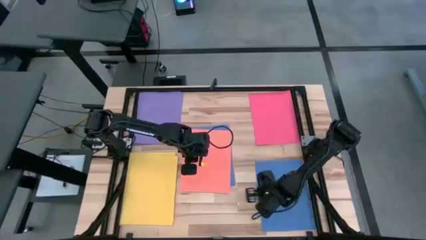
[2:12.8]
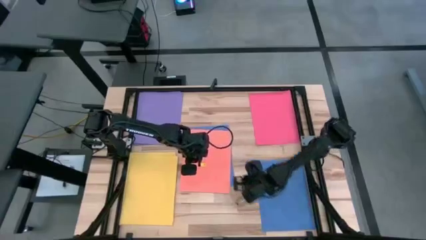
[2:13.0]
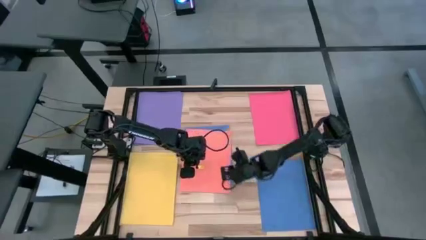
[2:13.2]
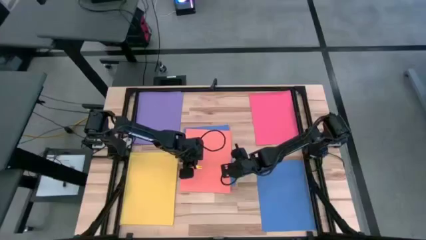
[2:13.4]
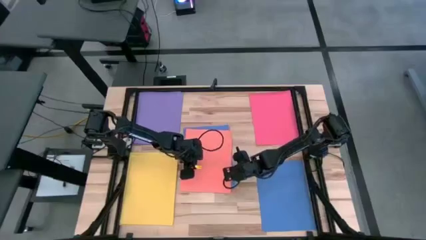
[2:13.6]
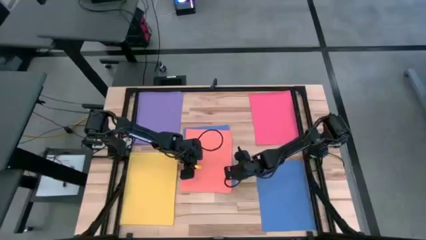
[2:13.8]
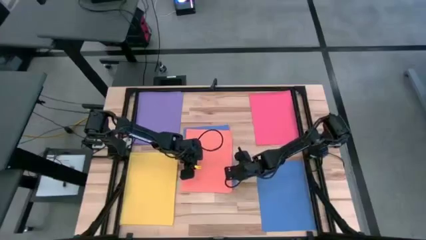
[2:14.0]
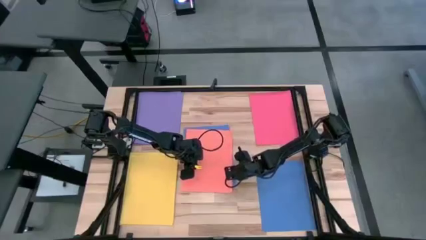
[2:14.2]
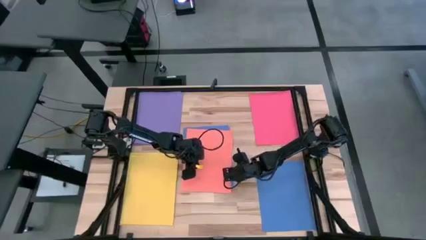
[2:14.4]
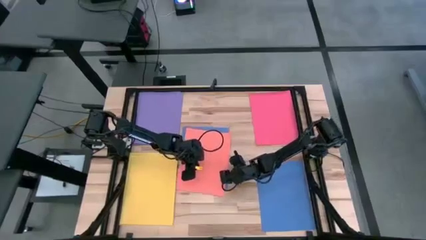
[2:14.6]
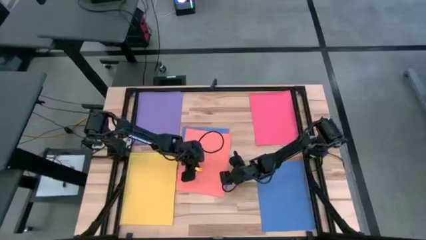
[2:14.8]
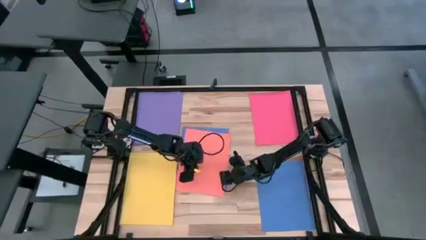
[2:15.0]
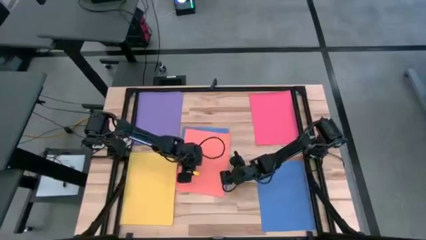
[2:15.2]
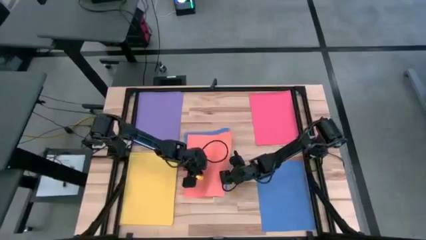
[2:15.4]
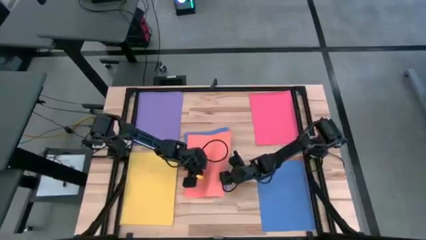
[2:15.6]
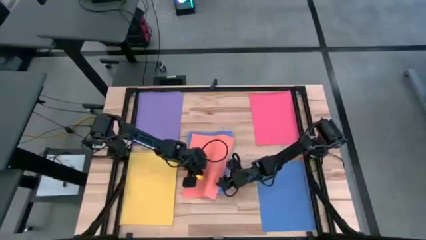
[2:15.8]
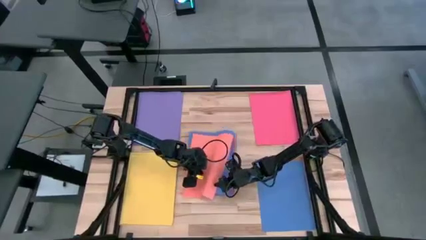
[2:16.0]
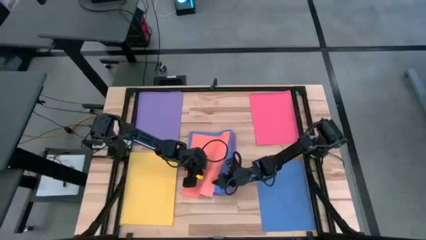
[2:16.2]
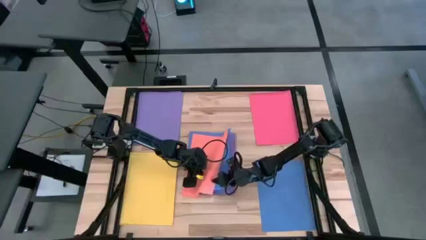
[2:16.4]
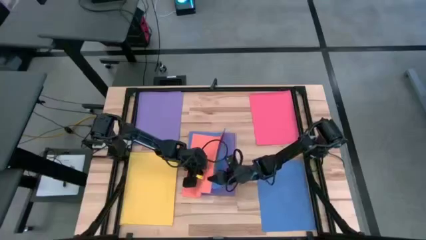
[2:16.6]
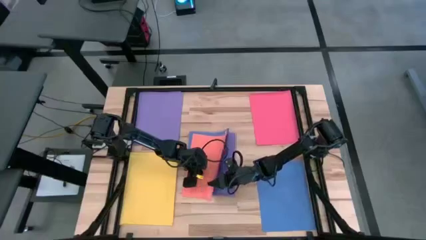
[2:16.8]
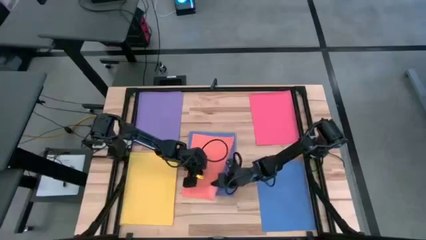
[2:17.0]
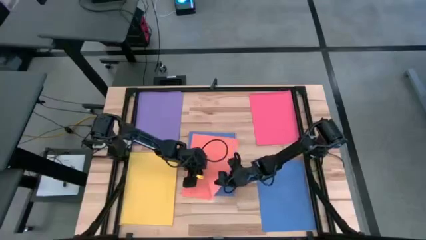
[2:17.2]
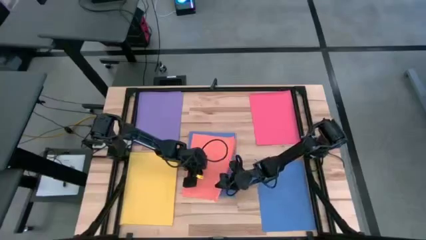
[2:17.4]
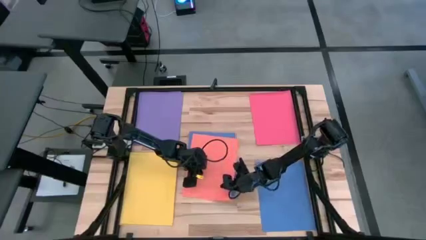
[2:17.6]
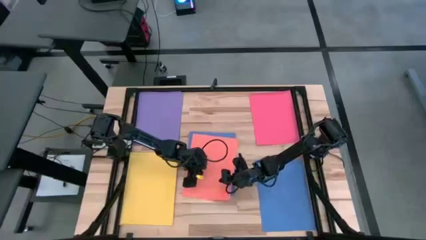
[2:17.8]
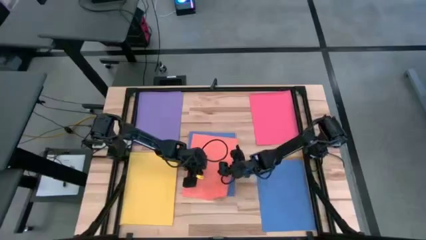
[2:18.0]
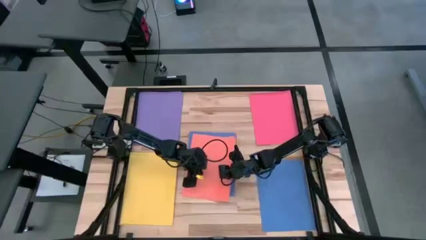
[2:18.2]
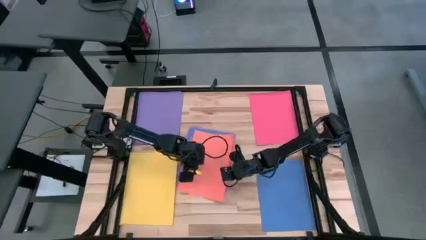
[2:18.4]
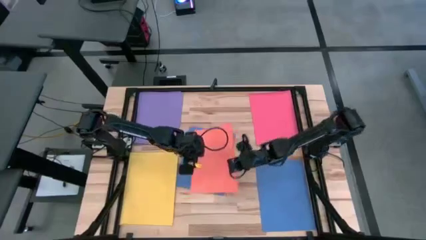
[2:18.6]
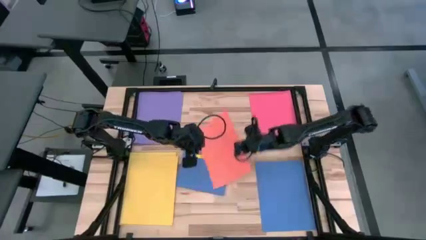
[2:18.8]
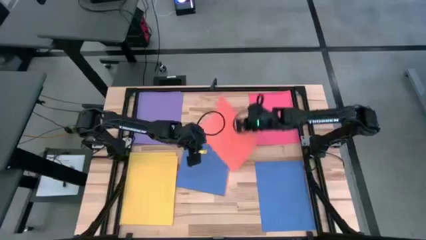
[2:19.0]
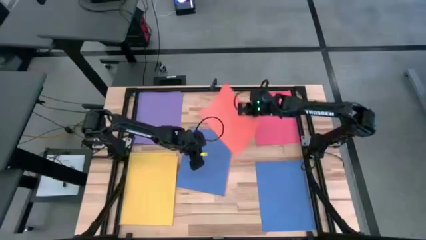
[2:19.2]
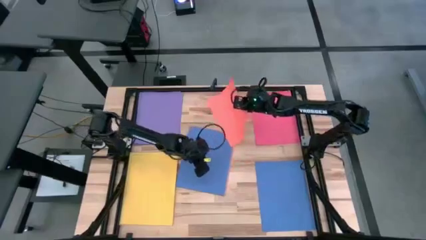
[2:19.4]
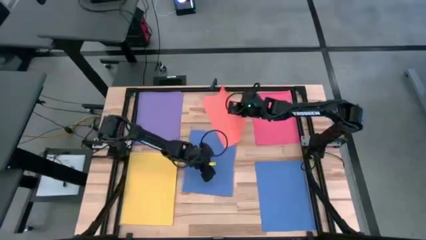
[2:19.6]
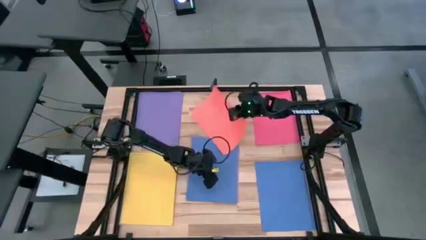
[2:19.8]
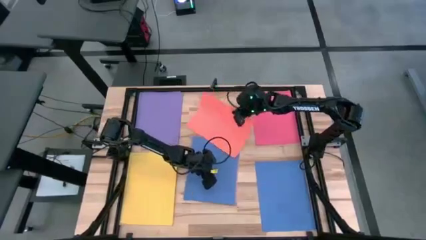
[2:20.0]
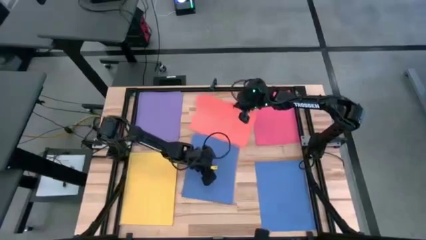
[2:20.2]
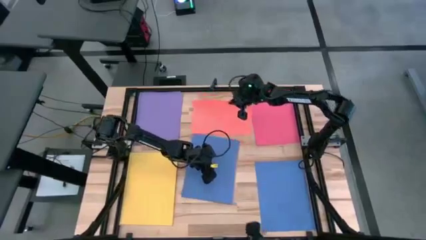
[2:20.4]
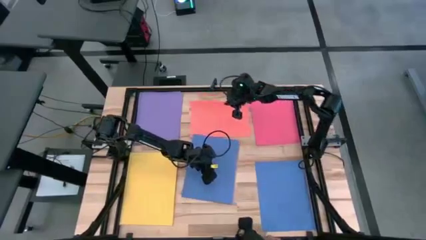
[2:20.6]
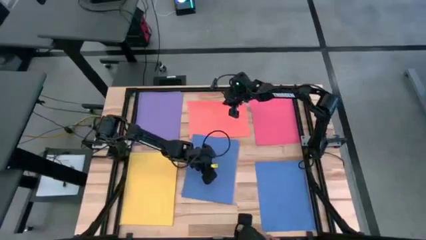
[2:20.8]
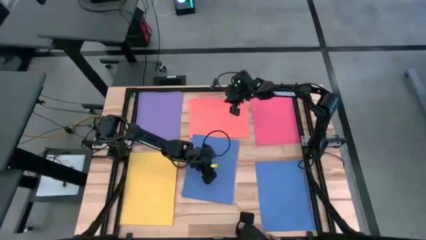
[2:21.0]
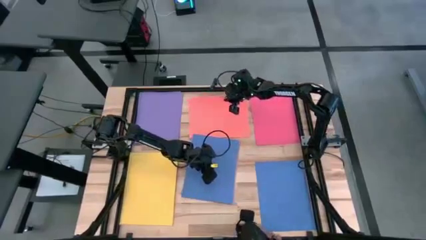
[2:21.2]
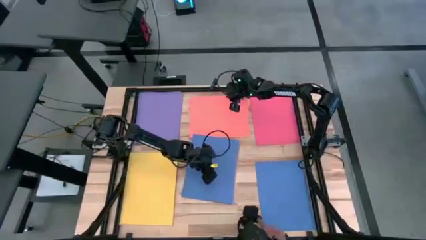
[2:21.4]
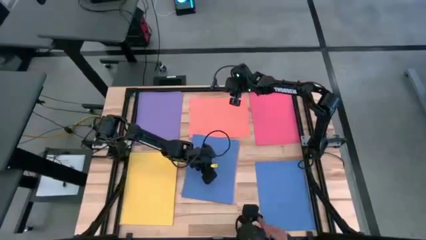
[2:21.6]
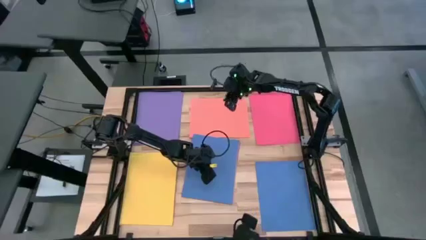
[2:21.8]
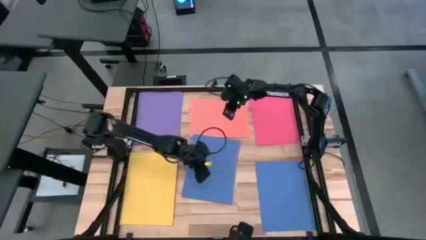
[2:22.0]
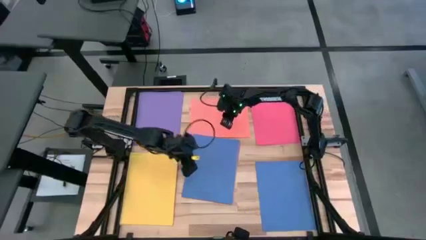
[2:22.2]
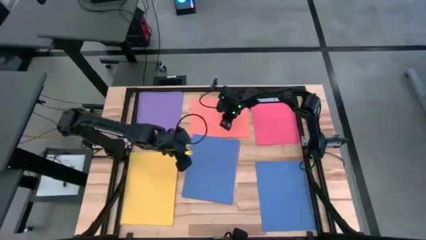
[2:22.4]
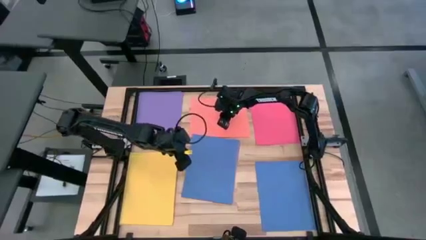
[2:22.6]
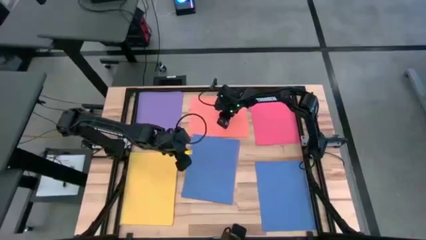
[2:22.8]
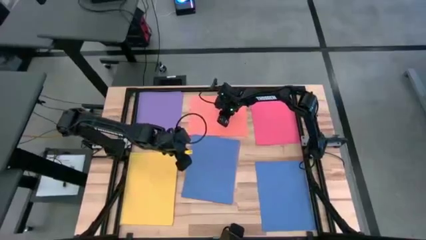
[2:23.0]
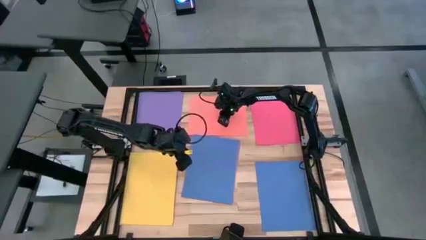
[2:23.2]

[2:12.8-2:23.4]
Task: Organize paper
Move the orange paper to the top center of the table

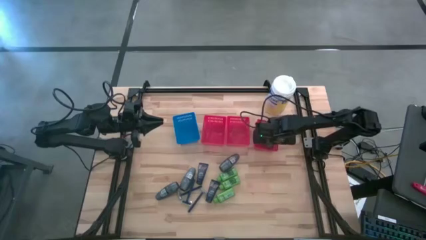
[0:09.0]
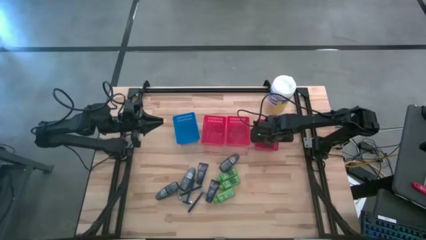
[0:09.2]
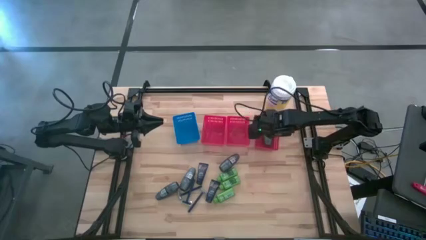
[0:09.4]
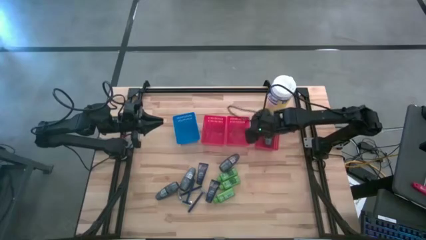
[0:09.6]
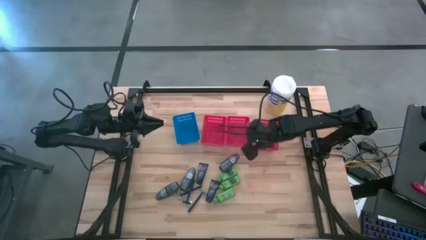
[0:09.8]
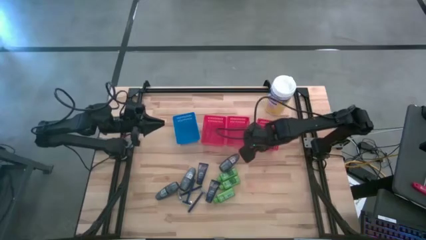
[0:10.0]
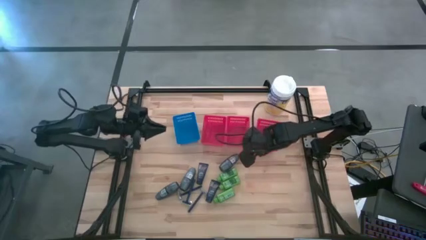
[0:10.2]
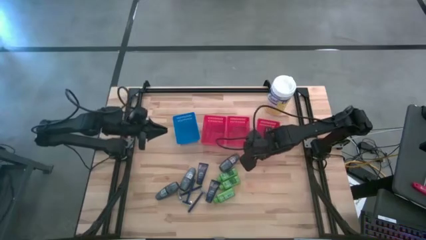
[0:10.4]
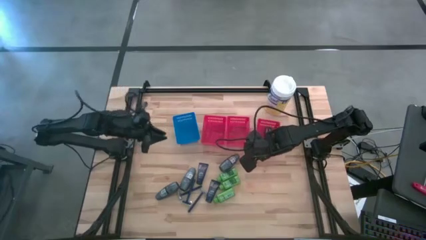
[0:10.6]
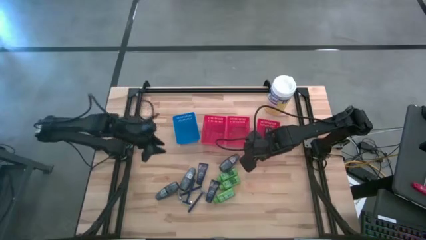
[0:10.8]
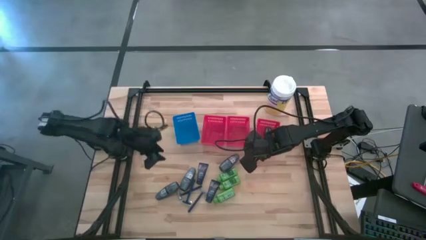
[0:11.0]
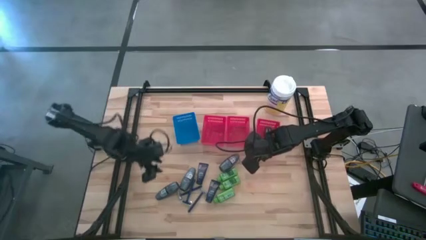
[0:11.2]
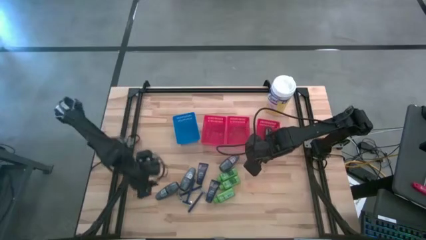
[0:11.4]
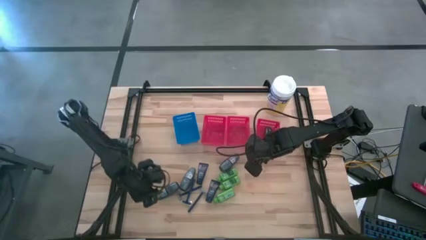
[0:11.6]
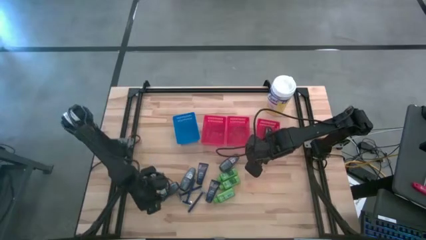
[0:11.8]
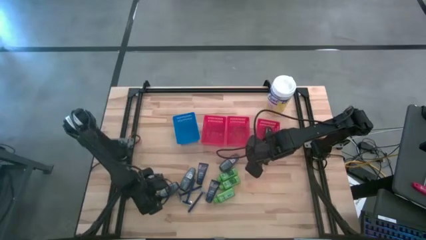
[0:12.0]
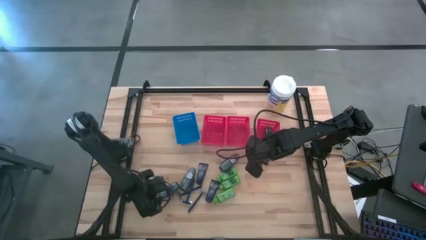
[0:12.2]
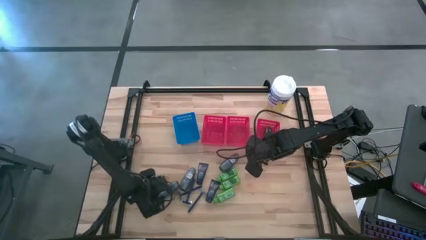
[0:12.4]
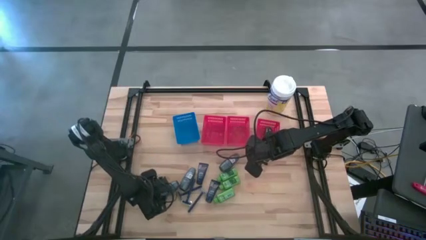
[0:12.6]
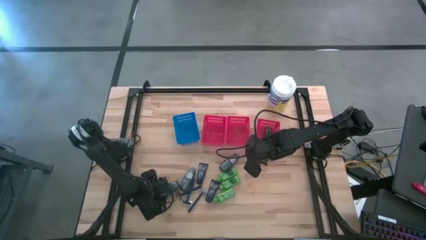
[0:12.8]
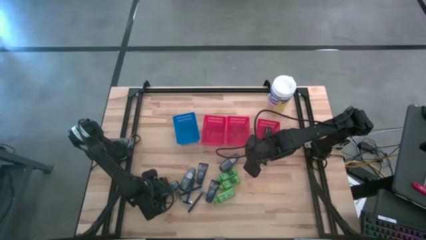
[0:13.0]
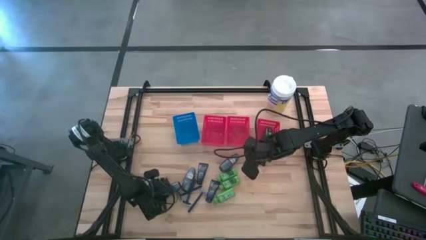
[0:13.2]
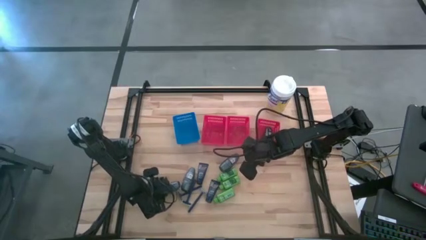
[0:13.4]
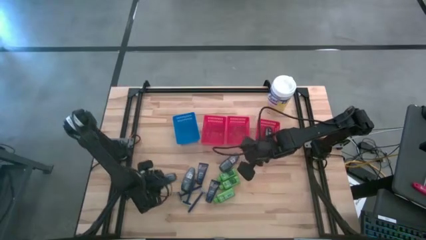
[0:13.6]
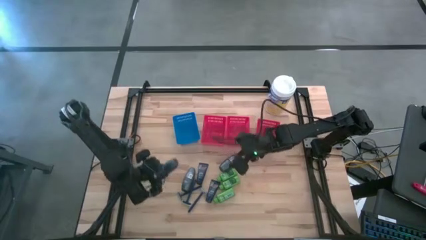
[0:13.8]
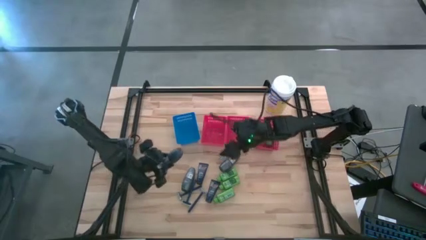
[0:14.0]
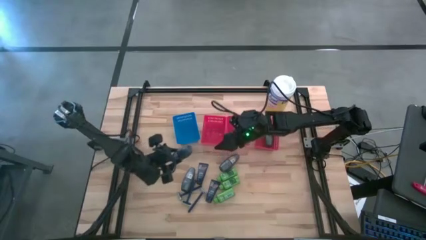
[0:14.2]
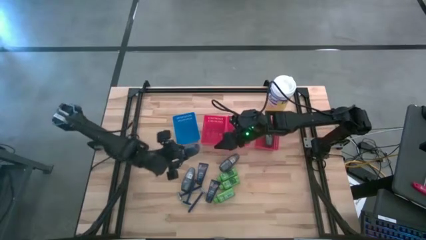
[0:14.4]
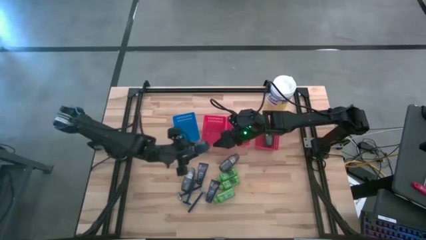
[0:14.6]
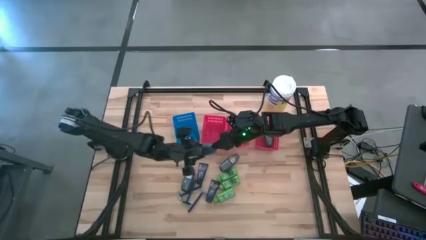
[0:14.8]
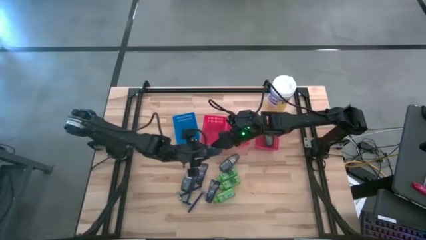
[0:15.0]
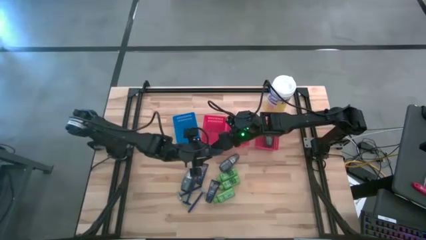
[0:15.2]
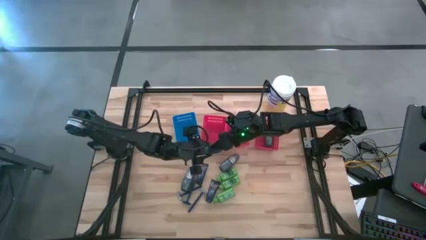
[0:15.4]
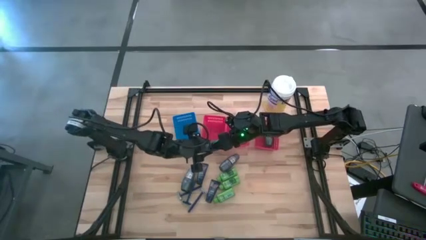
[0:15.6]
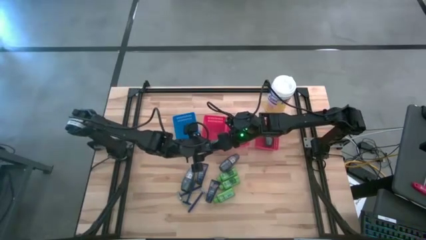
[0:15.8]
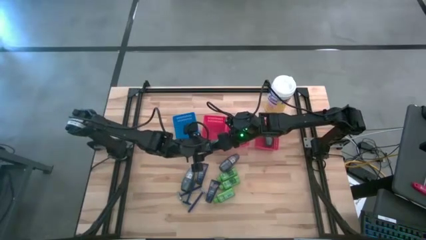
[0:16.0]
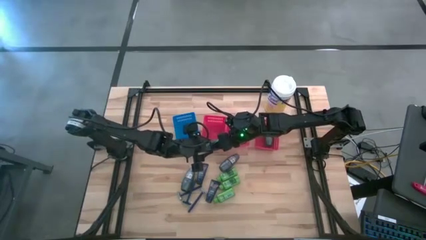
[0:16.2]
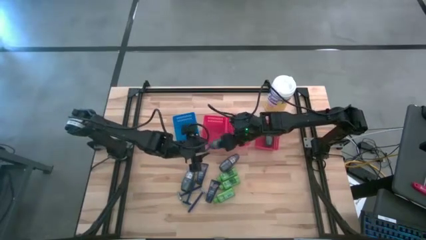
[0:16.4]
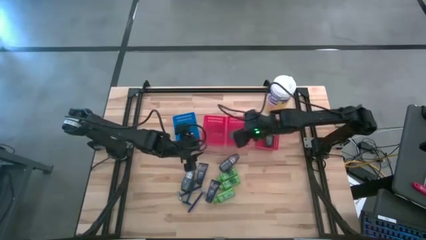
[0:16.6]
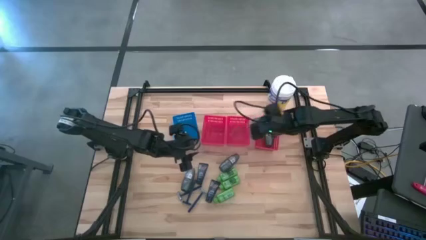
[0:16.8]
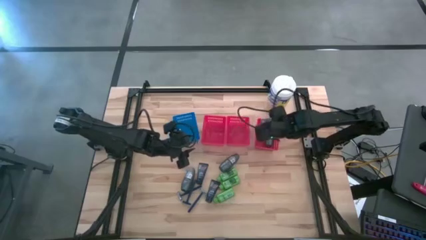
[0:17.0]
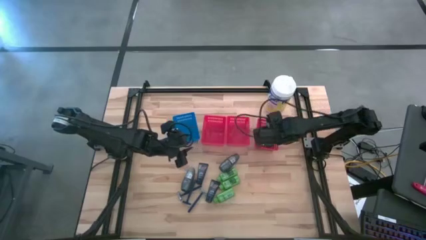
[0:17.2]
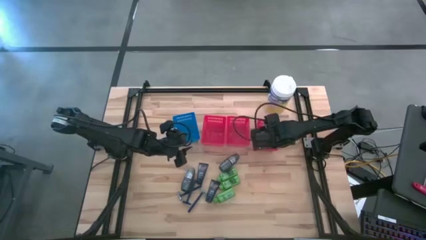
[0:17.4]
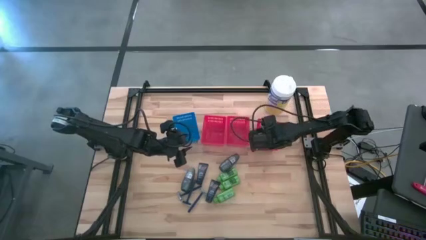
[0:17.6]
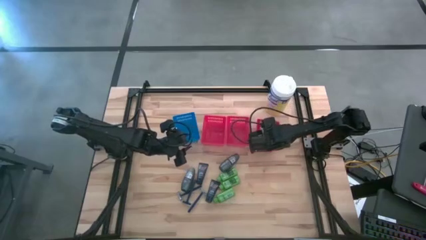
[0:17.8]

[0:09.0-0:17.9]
Task: Pick & Place Travel size toiletries
Put the deodorant into the right red bin
